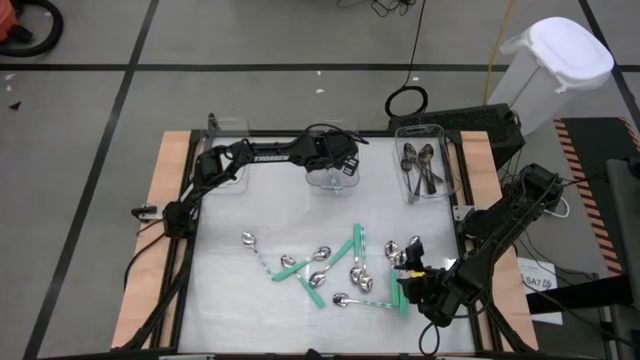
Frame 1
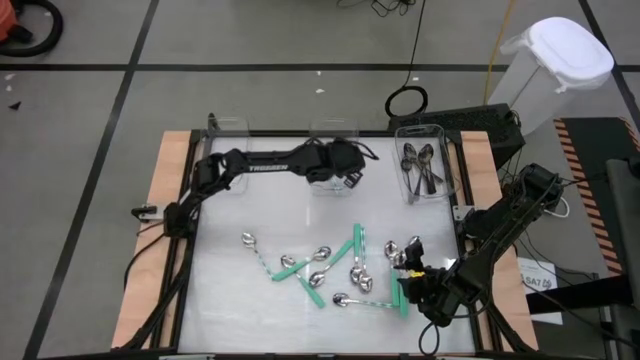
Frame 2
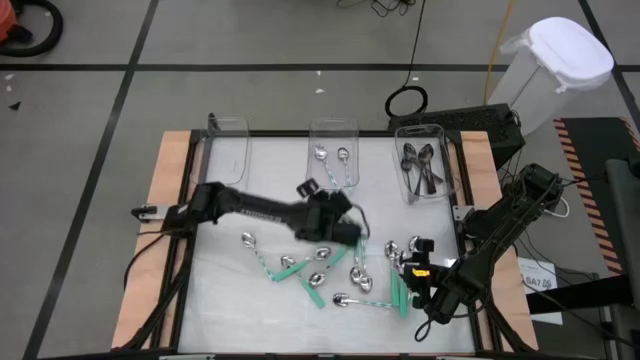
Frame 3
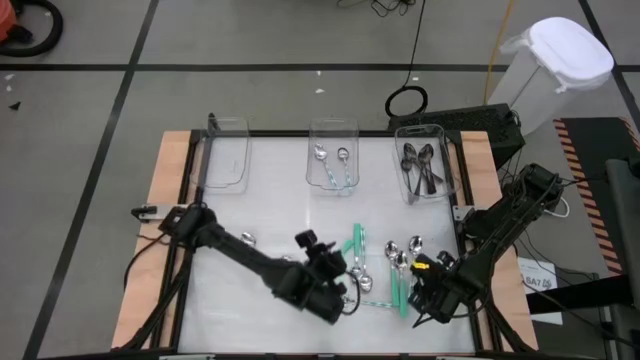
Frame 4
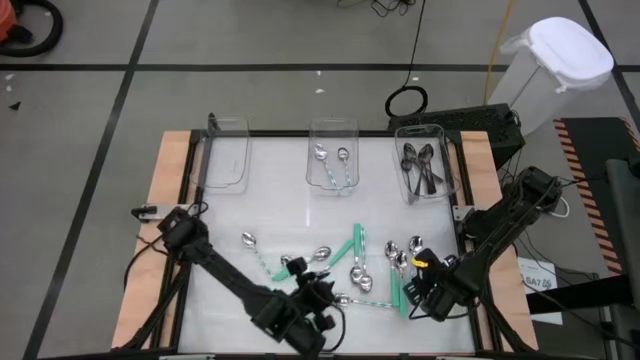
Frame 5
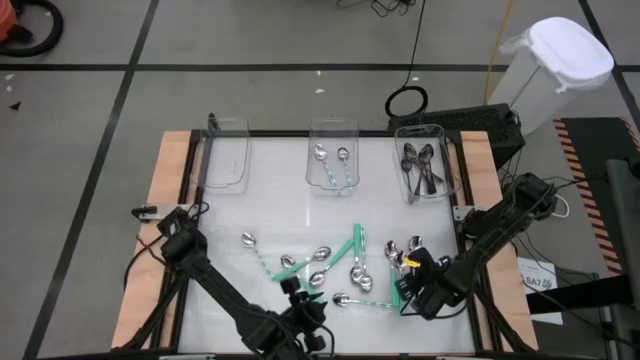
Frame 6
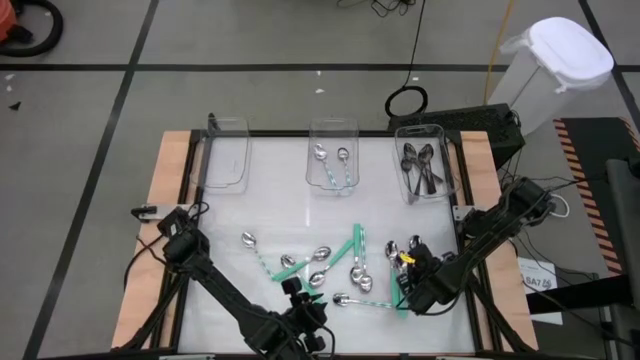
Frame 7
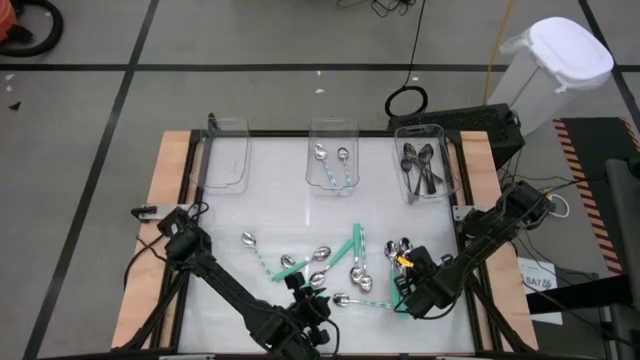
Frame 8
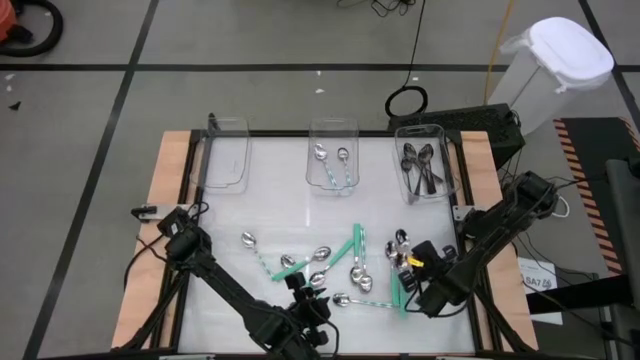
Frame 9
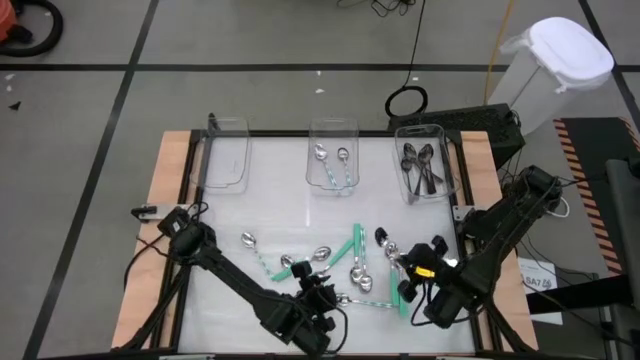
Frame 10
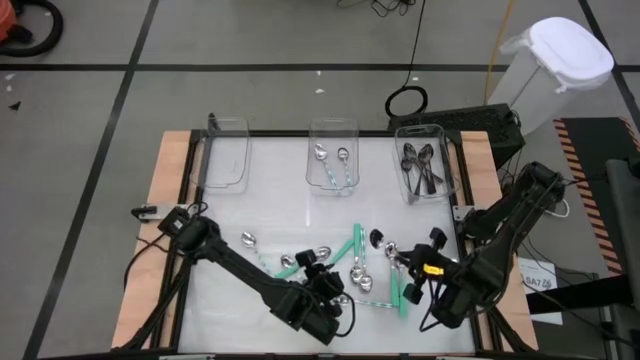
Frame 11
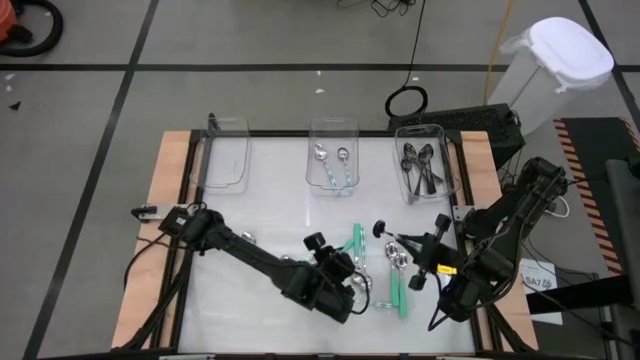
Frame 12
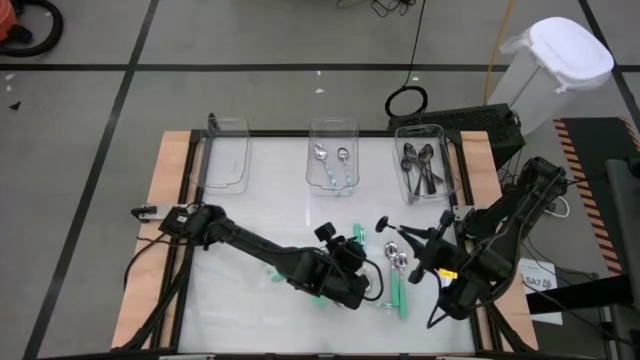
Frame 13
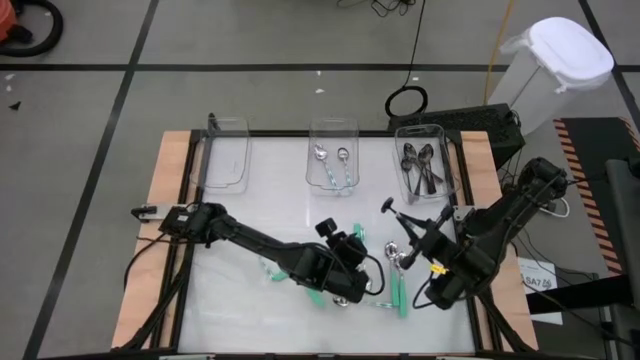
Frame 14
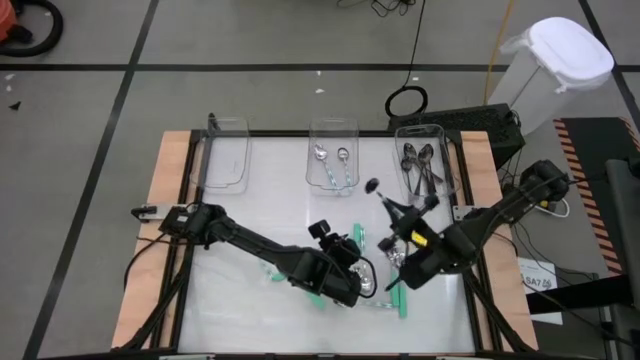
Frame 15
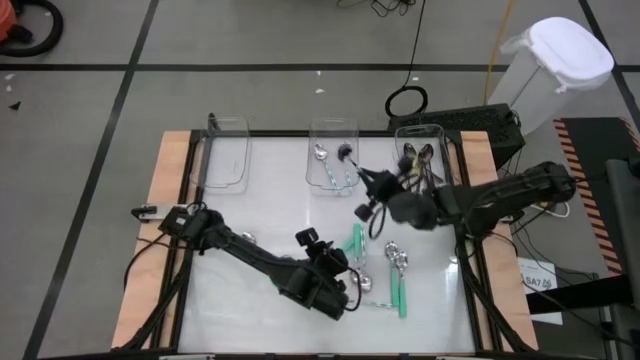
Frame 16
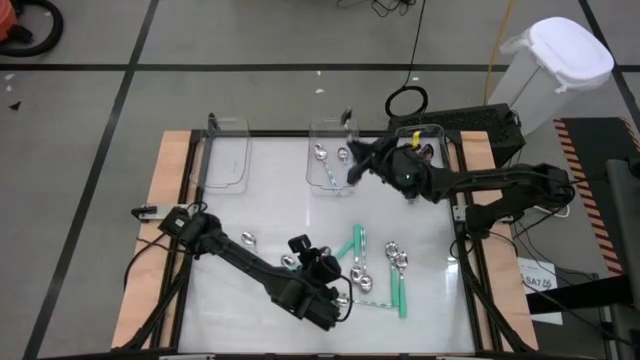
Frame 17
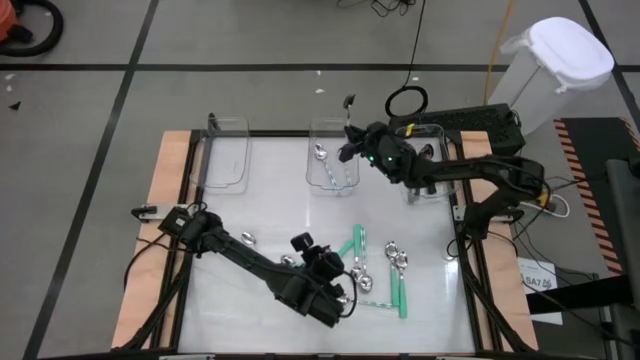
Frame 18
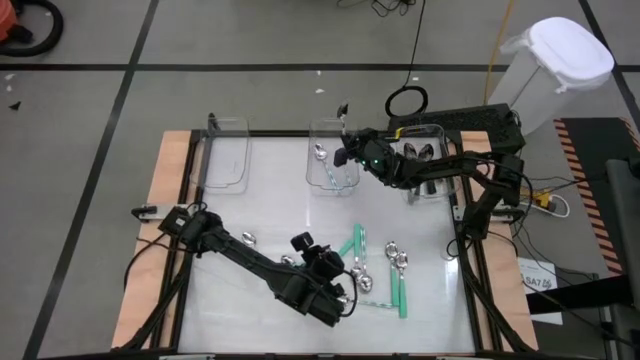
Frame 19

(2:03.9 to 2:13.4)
Task: Sort silverware by color (type)
Put the white-green spoon into the middle transparent bin

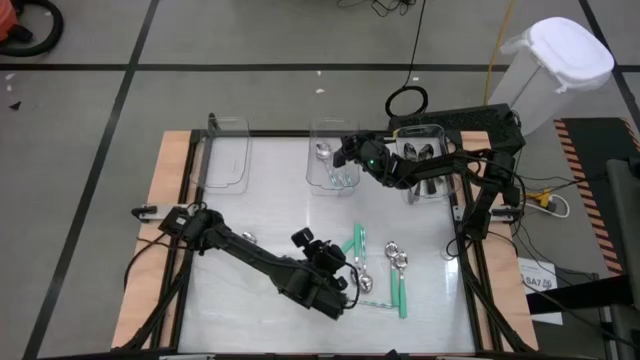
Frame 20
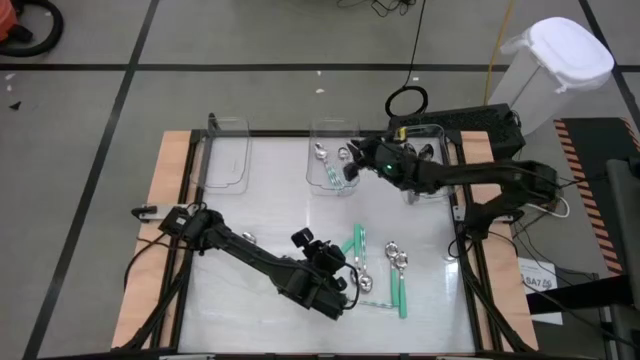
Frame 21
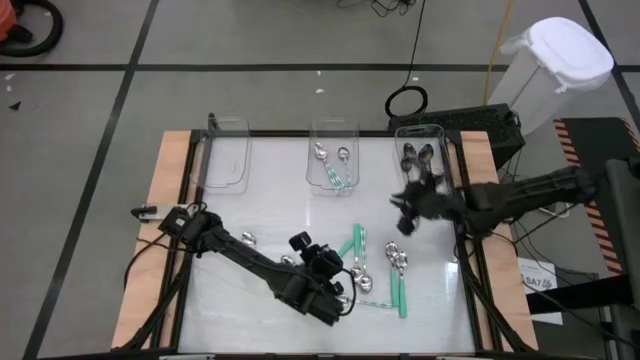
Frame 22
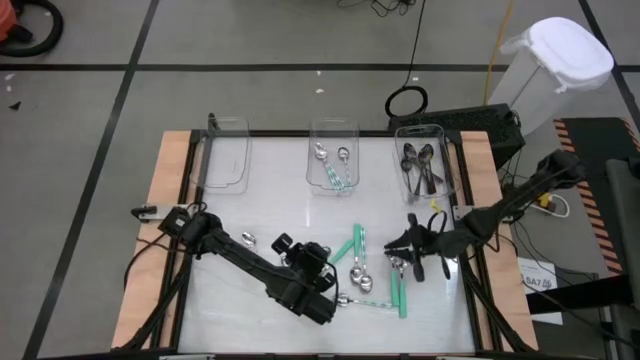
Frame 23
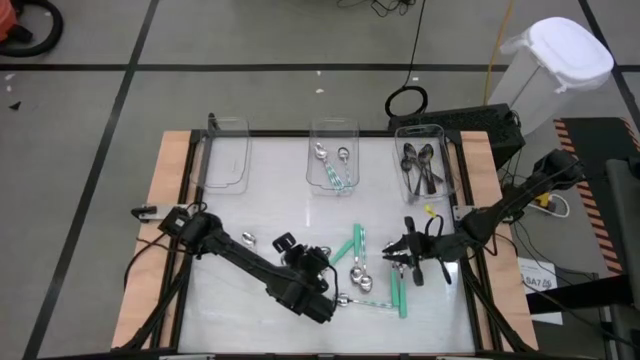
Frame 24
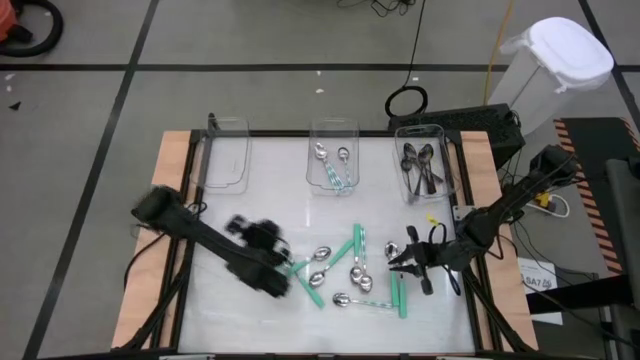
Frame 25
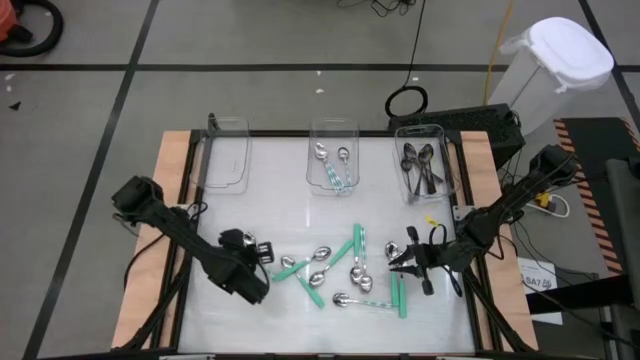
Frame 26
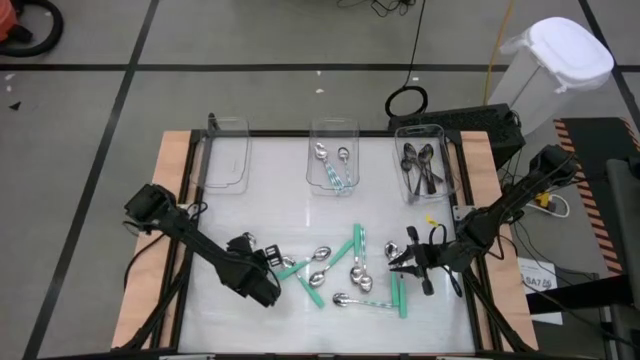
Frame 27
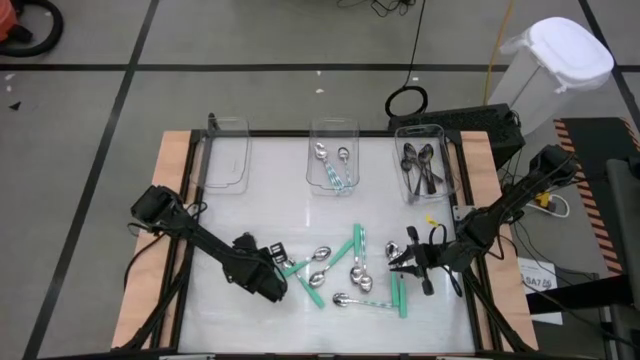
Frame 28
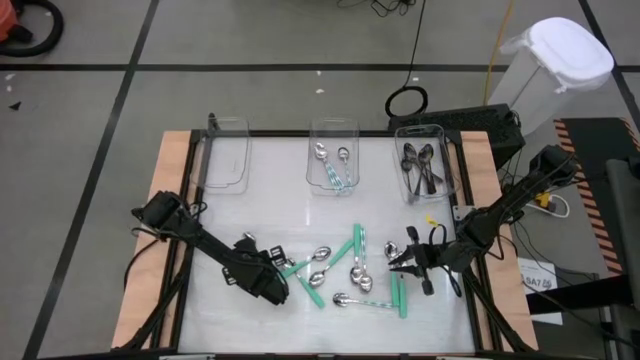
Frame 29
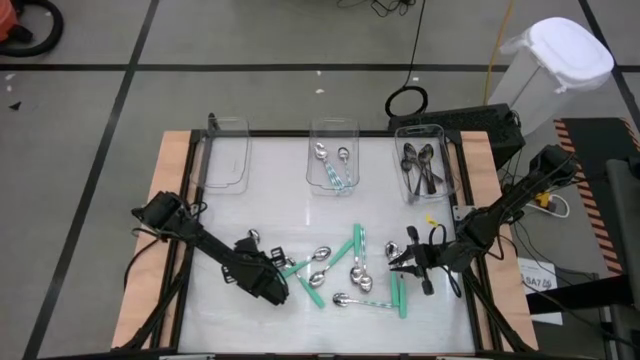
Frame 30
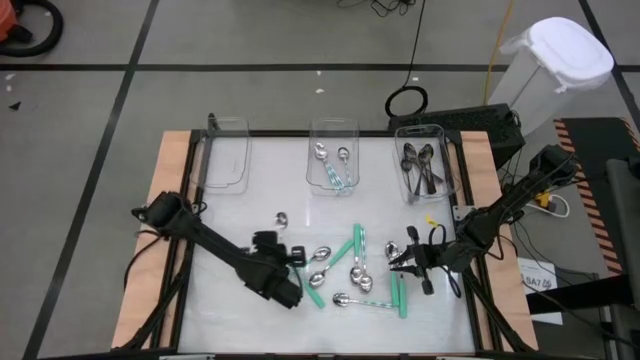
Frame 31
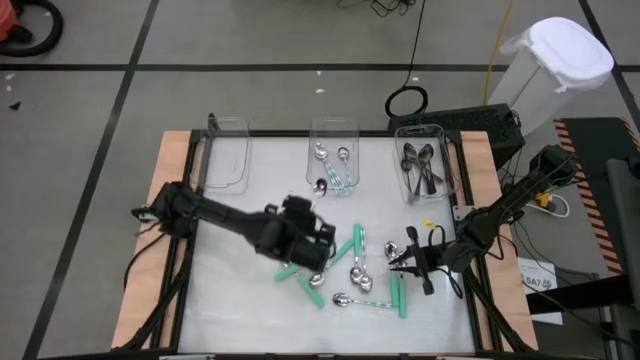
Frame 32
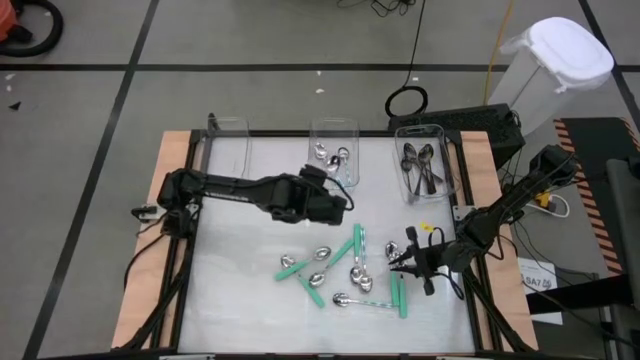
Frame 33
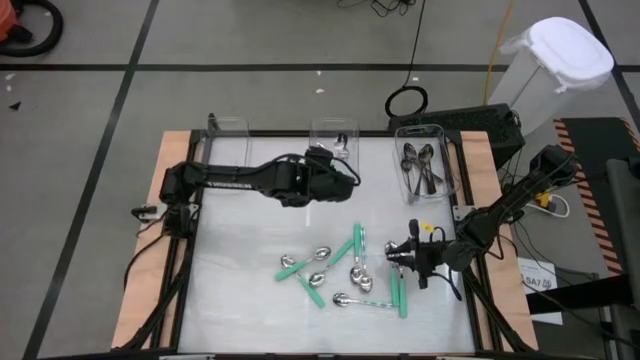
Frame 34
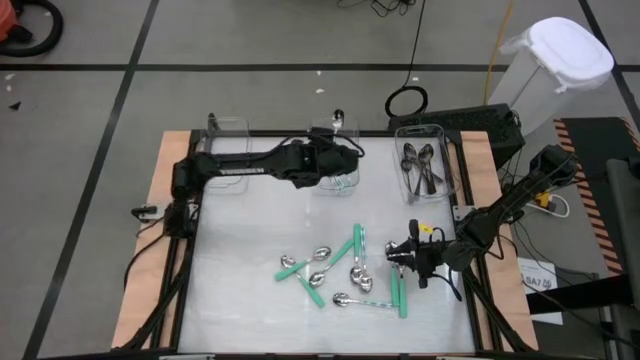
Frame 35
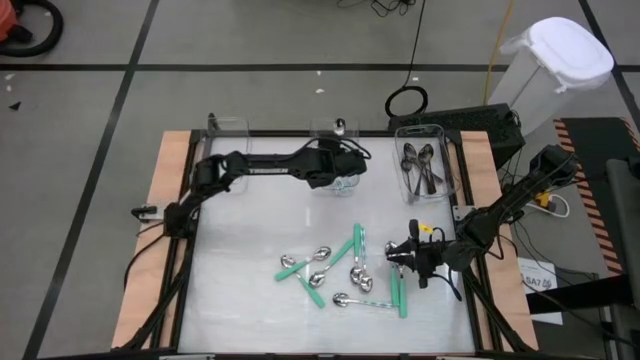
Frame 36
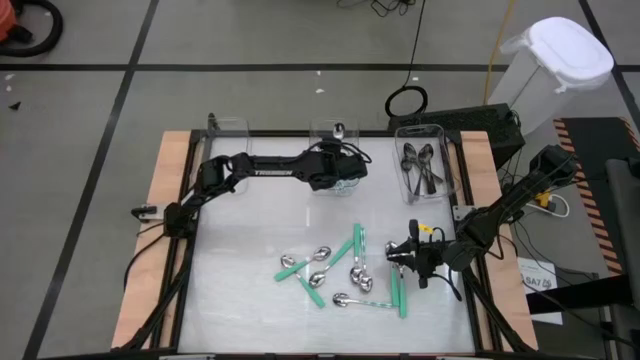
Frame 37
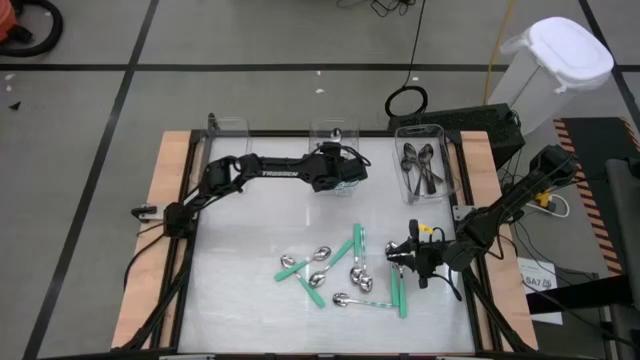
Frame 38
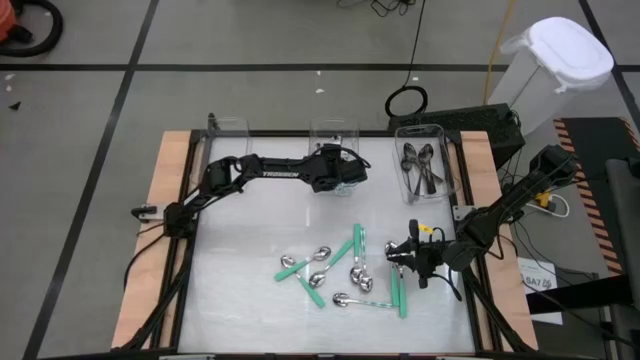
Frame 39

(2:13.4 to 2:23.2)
Put the white-green spoon into the middle transparent bin
